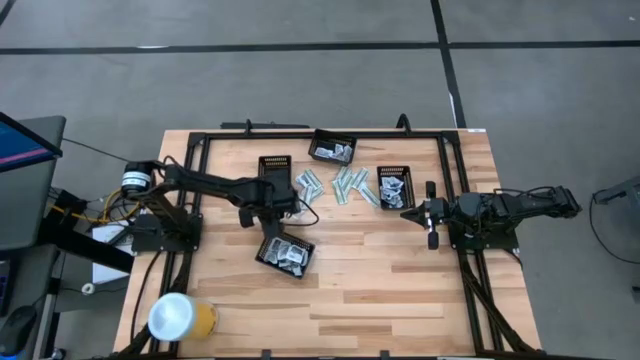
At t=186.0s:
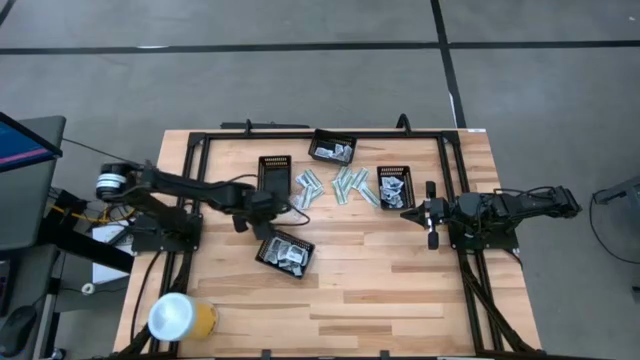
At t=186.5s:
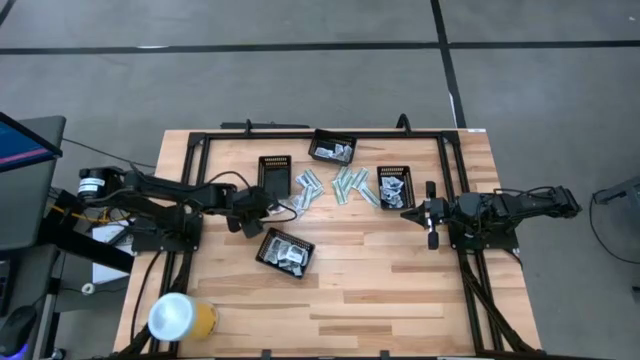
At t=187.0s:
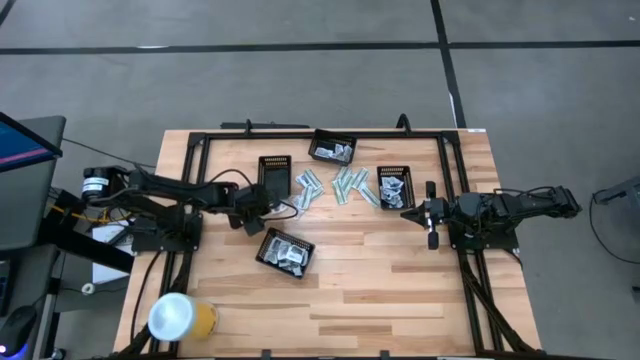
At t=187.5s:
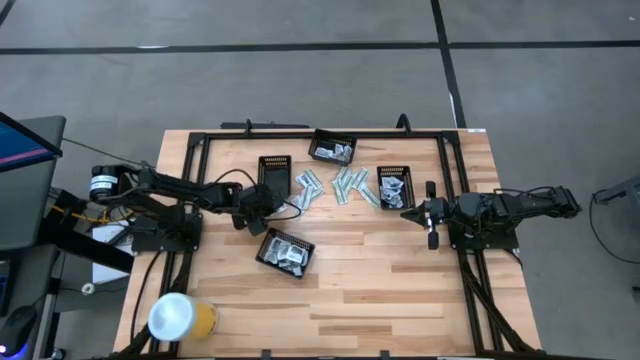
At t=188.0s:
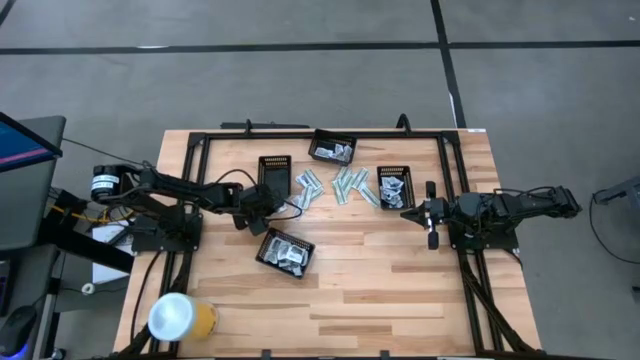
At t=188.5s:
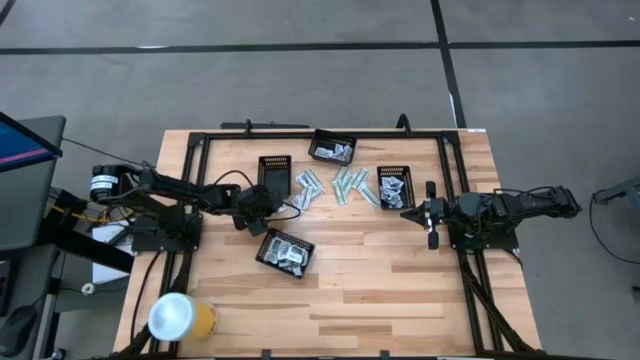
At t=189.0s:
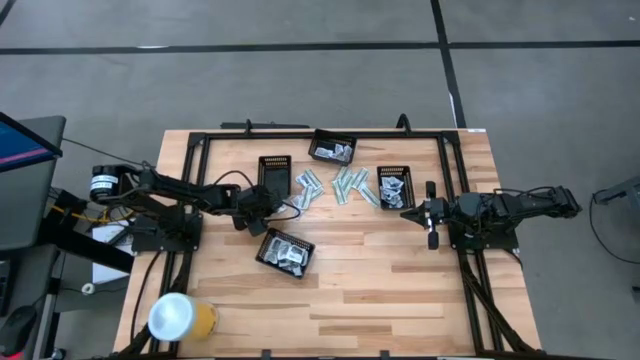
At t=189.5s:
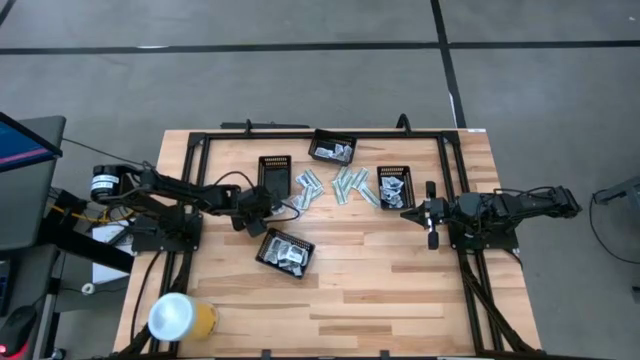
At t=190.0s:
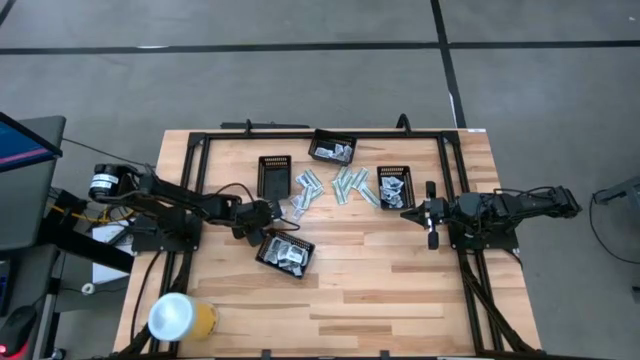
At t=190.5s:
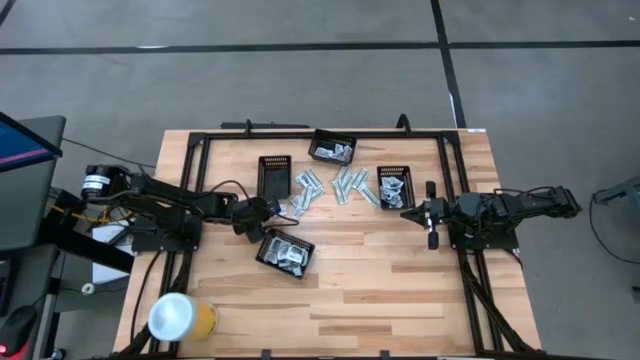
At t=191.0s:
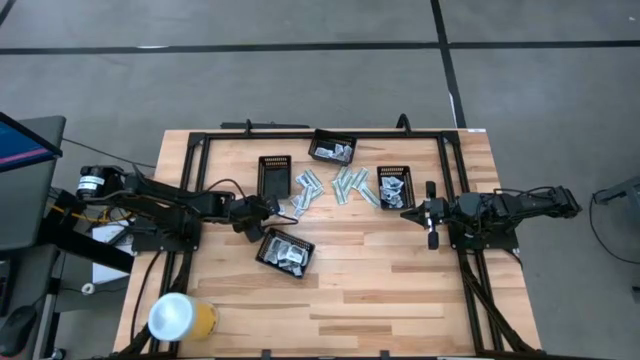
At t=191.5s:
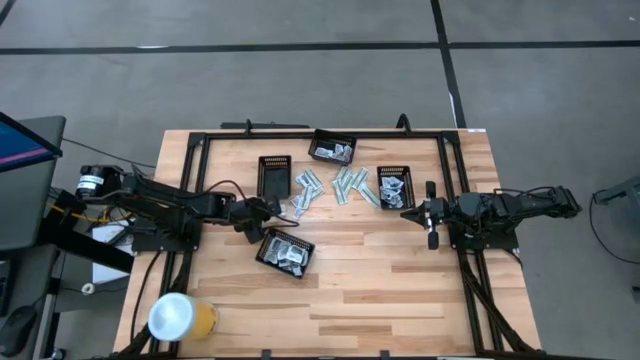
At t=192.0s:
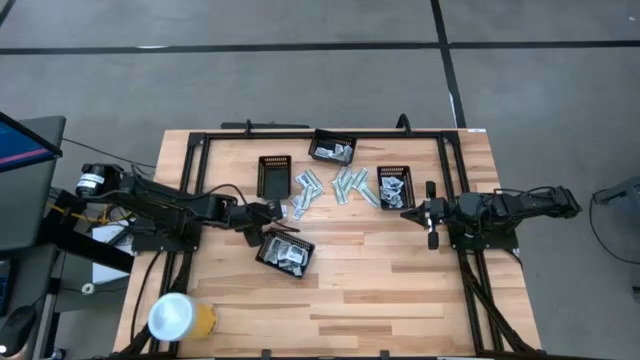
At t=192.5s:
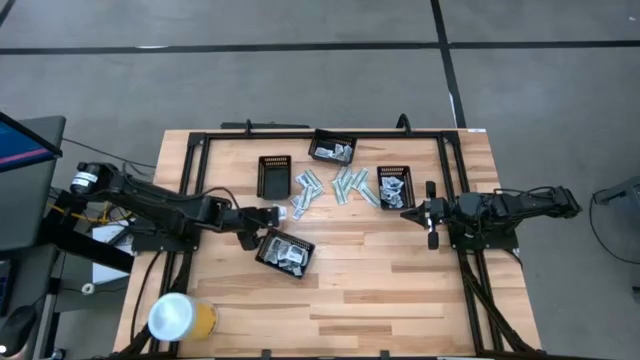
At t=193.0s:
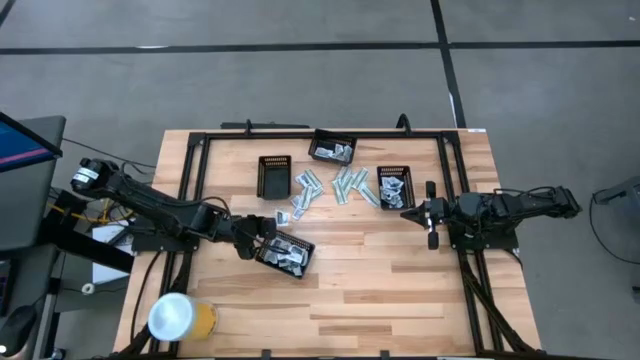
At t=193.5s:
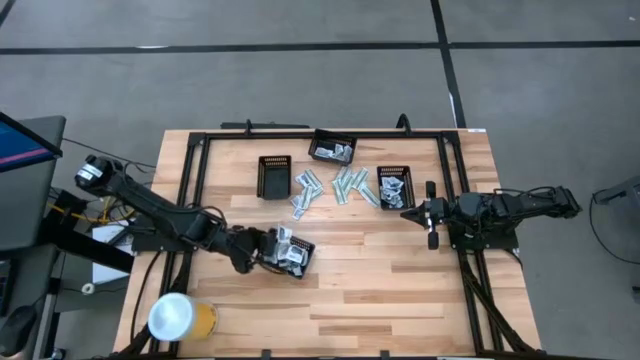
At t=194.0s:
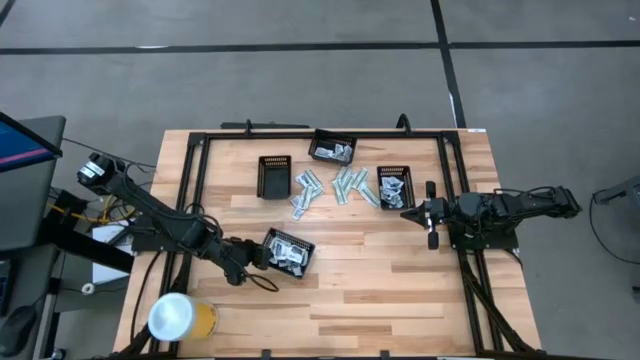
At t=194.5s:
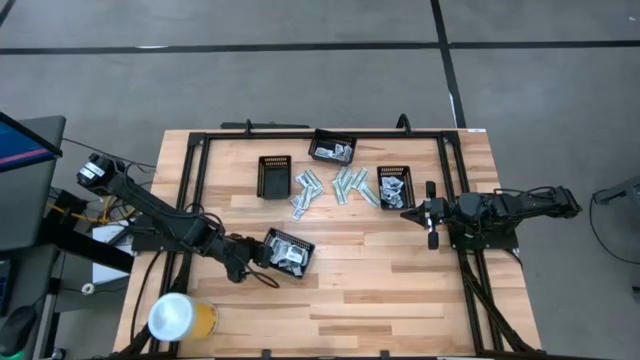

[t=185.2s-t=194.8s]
Task: Pick & Place First Aid Supplies
Put the white towelette pack into the bottom black bin

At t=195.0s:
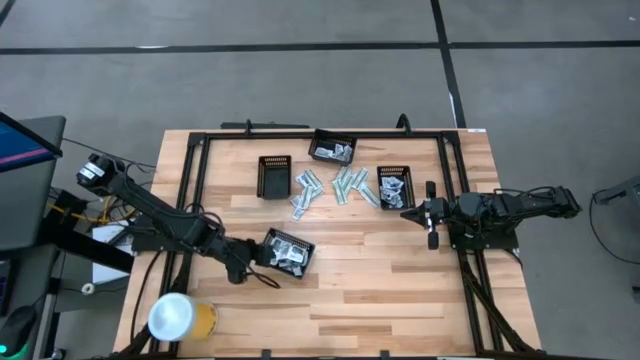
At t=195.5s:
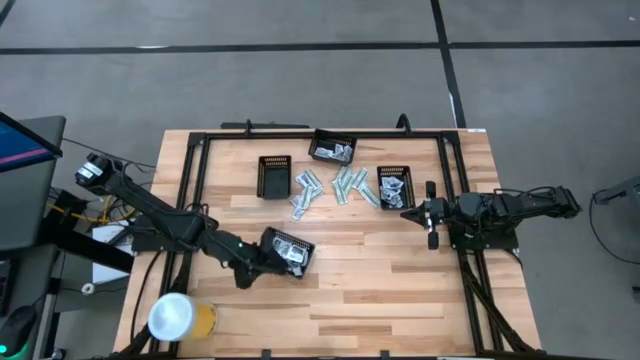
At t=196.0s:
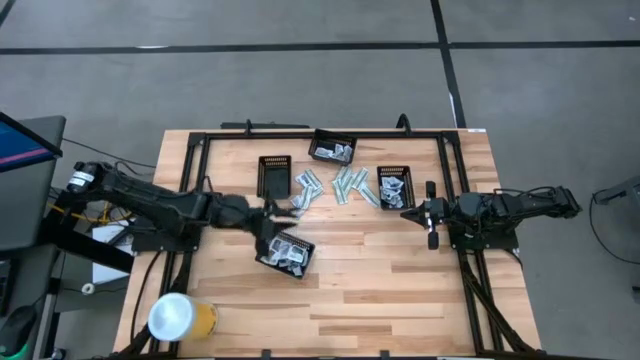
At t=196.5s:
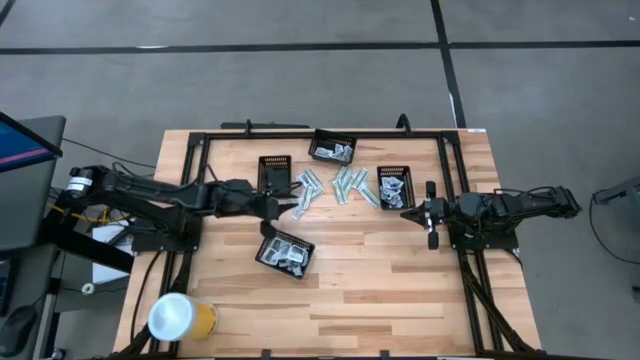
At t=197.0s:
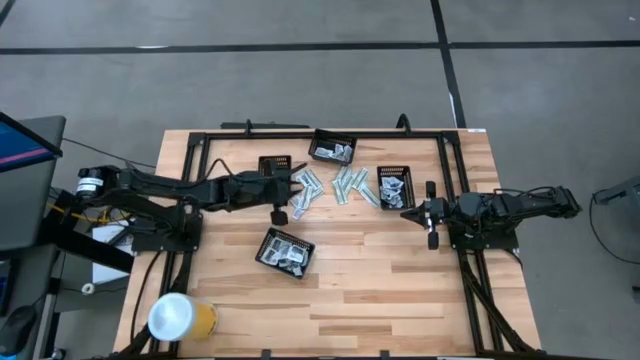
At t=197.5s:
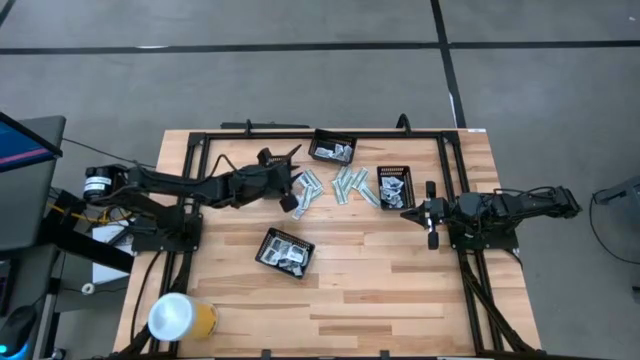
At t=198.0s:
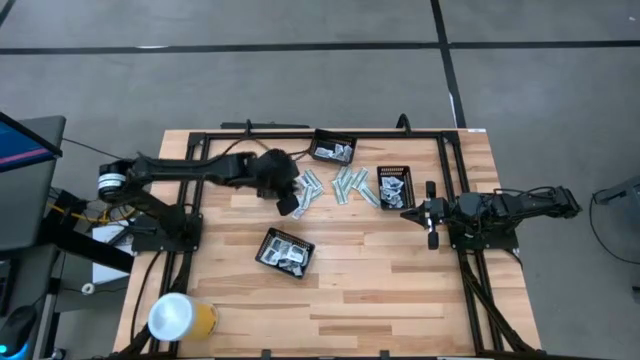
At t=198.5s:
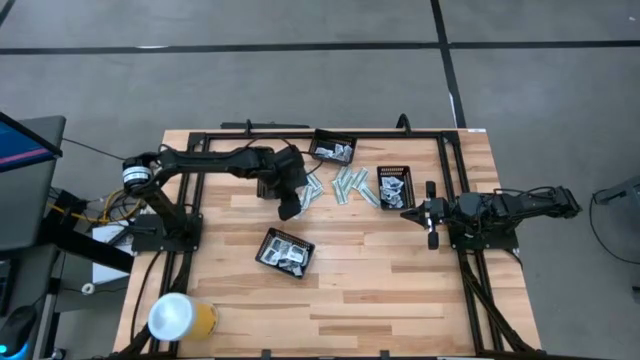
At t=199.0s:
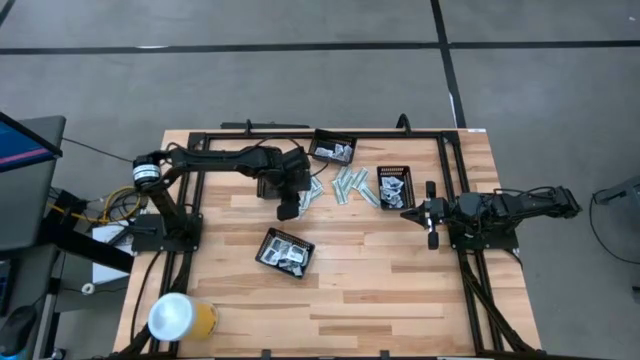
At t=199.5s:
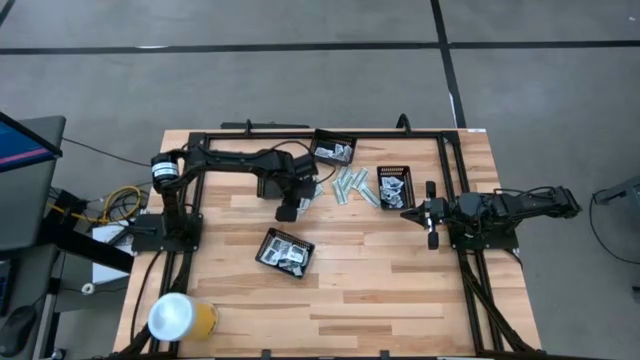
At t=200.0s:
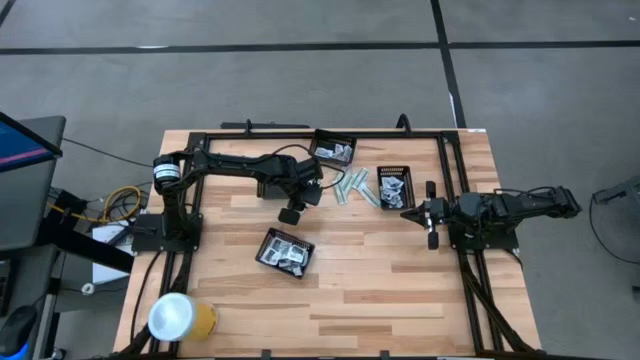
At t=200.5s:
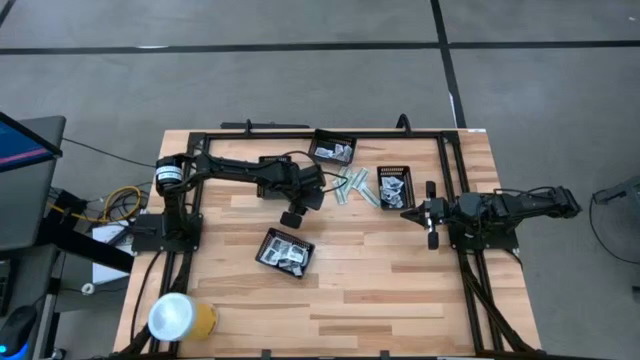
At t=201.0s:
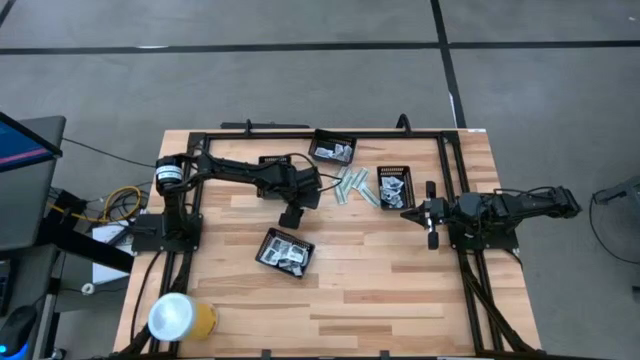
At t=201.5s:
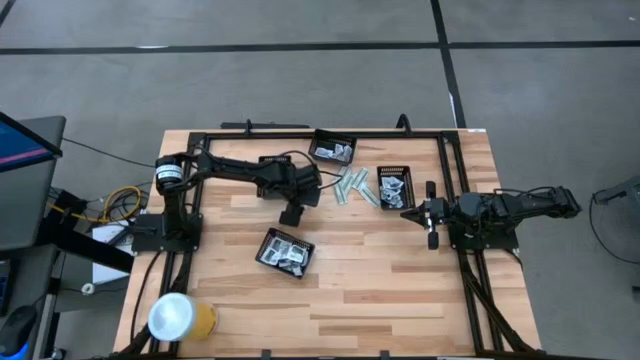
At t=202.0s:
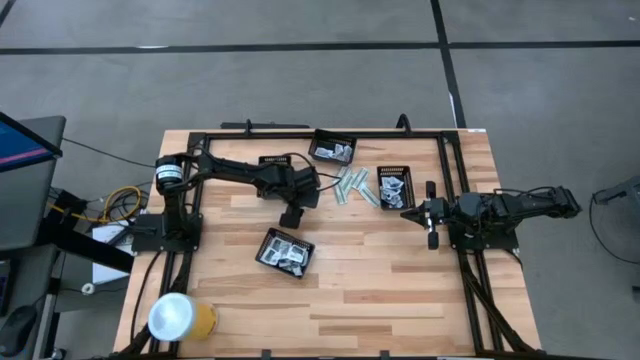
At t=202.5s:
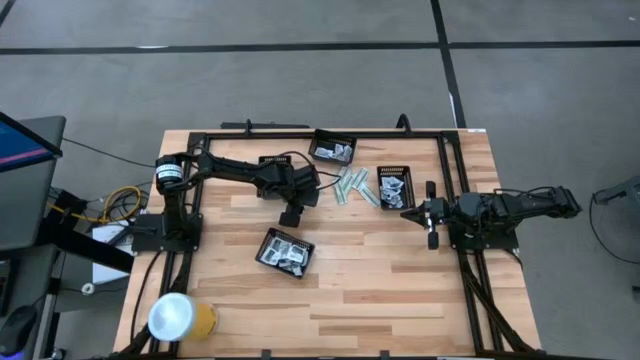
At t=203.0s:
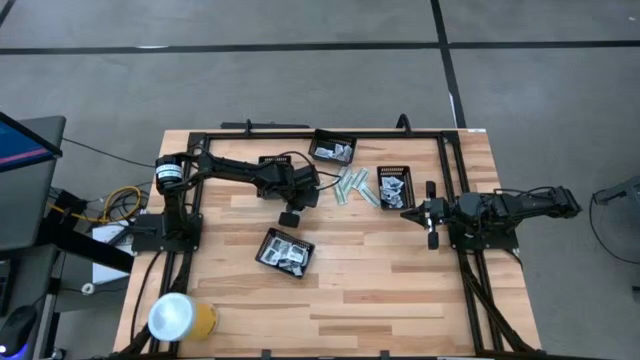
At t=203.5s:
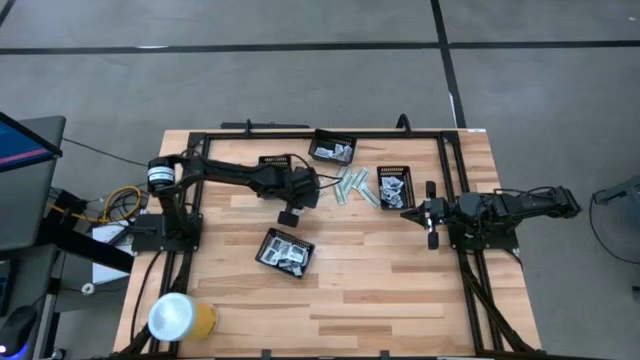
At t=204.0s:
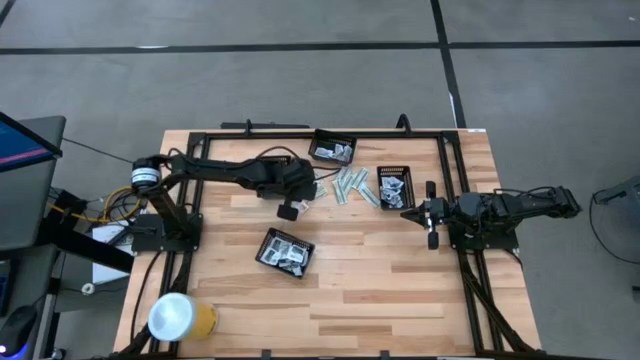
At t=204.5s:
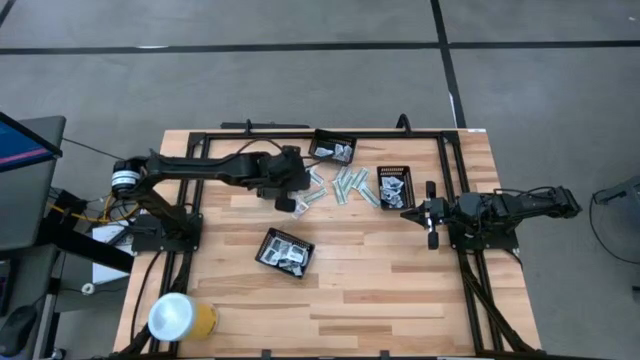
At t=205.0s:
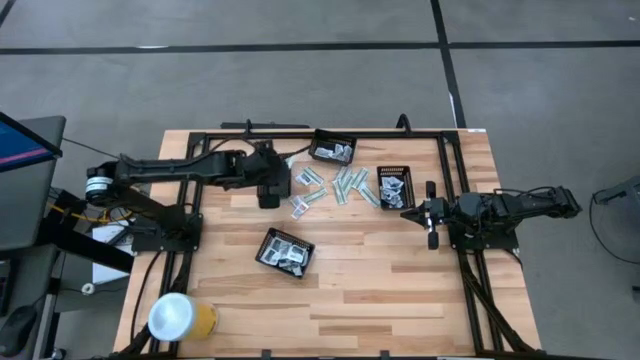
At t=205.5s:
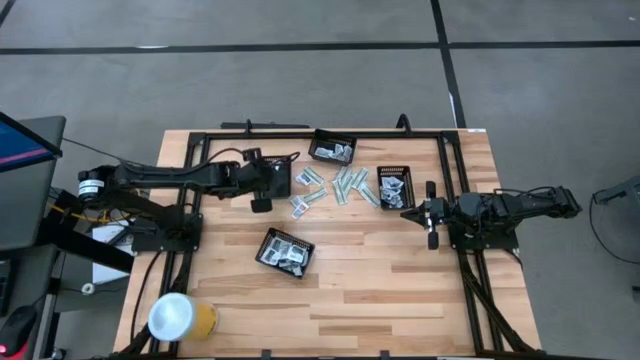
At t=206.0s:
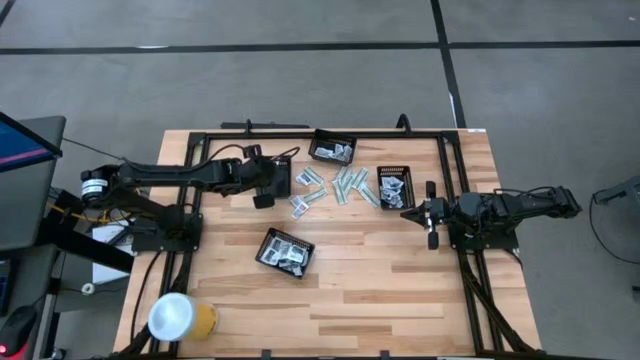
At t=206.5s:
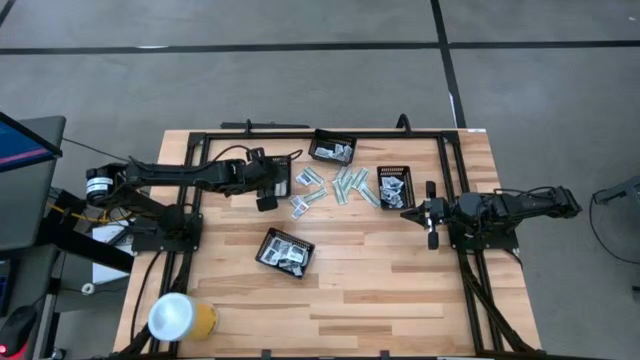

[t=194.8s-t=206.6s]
Put the green bandage into the left black bin
